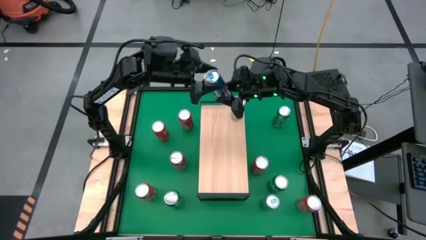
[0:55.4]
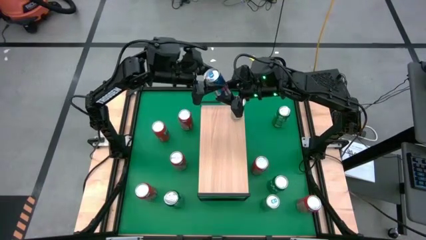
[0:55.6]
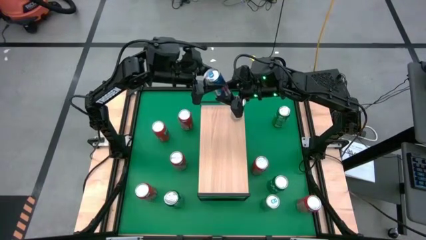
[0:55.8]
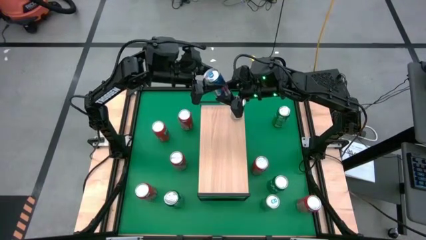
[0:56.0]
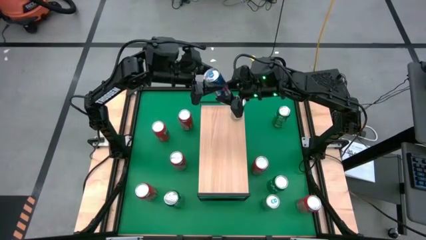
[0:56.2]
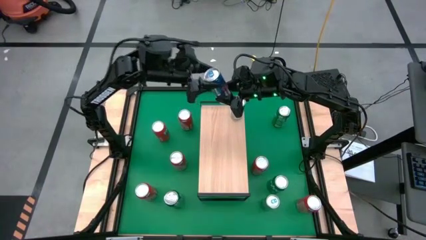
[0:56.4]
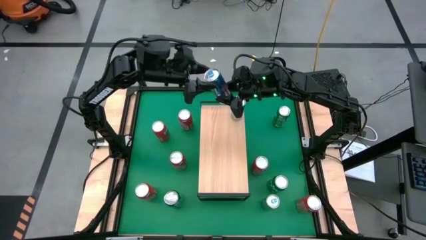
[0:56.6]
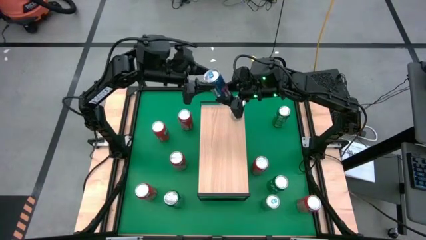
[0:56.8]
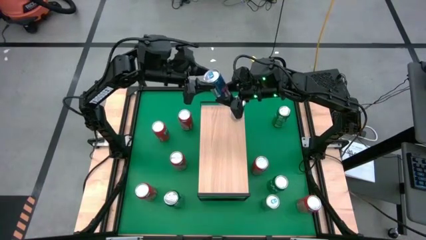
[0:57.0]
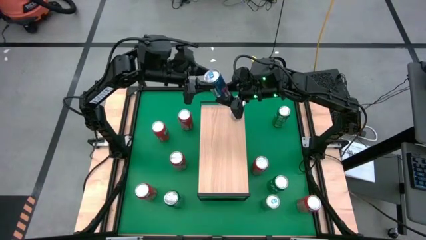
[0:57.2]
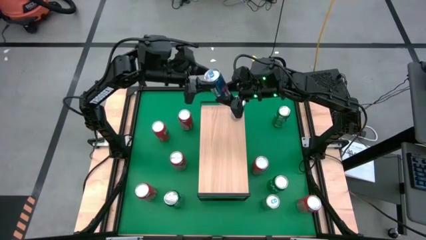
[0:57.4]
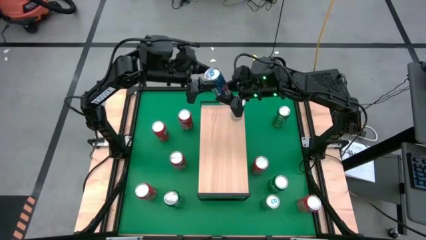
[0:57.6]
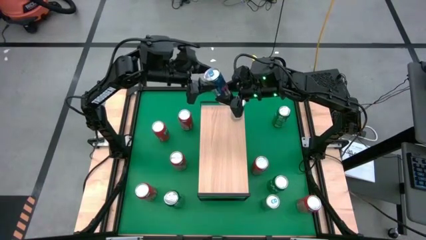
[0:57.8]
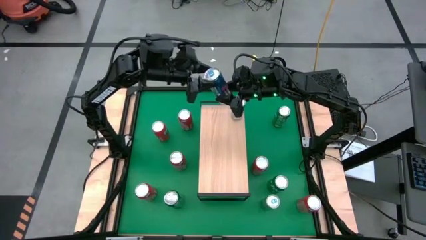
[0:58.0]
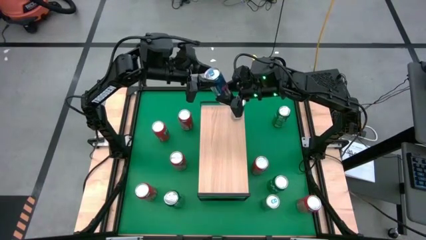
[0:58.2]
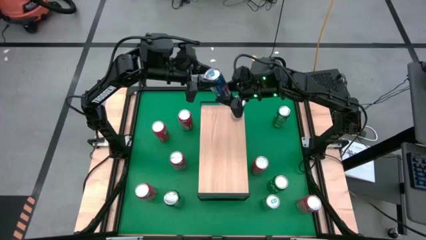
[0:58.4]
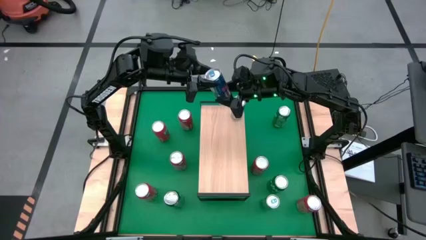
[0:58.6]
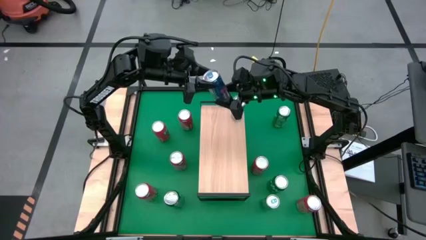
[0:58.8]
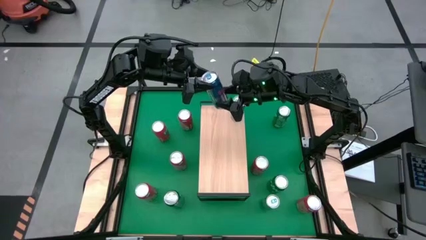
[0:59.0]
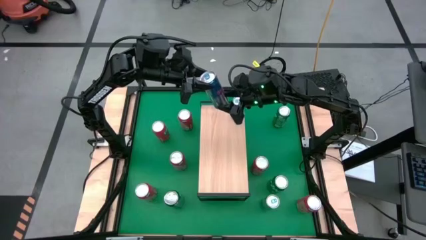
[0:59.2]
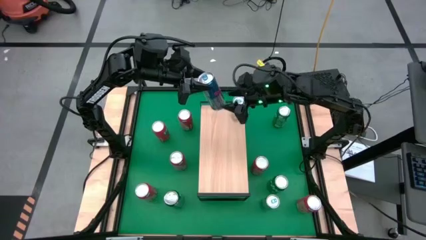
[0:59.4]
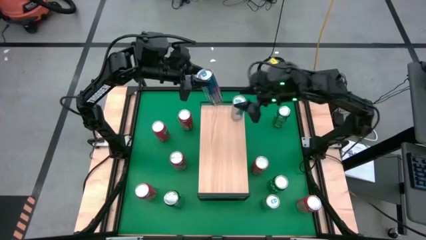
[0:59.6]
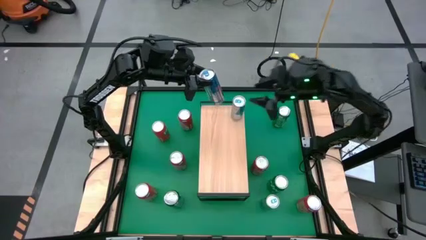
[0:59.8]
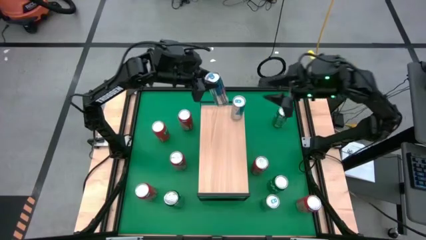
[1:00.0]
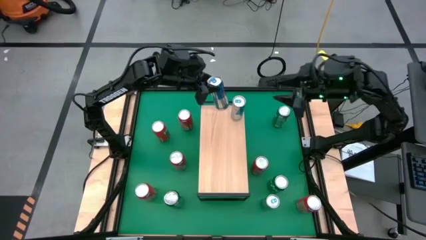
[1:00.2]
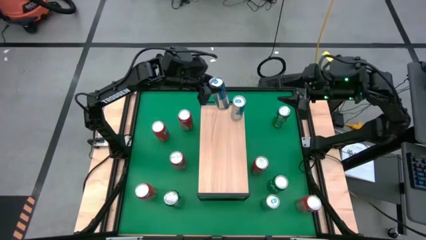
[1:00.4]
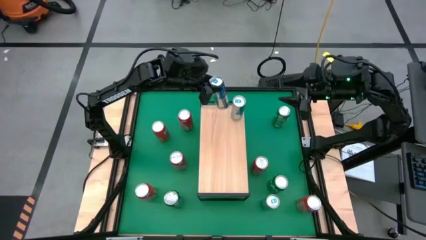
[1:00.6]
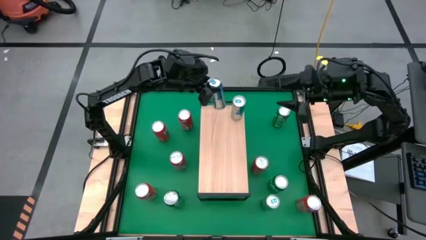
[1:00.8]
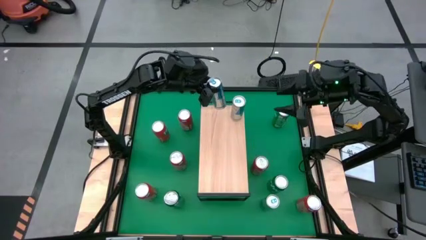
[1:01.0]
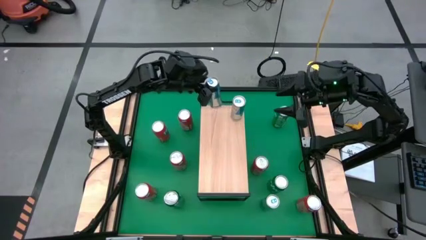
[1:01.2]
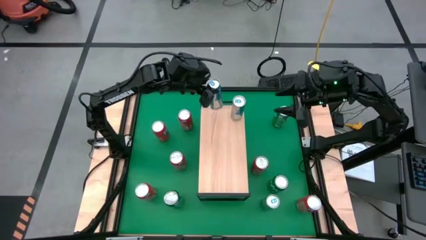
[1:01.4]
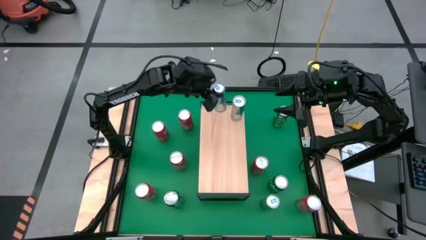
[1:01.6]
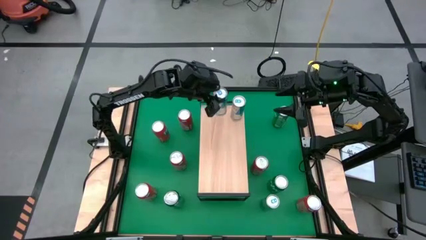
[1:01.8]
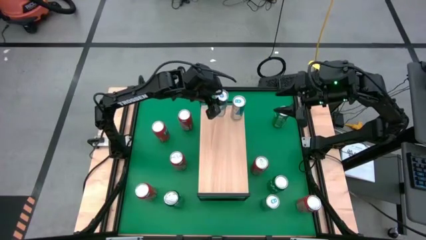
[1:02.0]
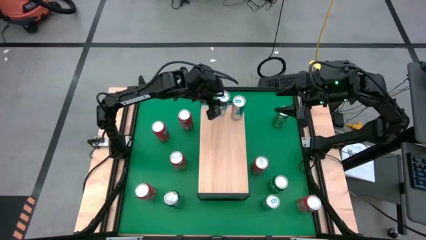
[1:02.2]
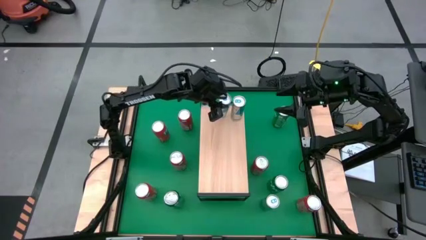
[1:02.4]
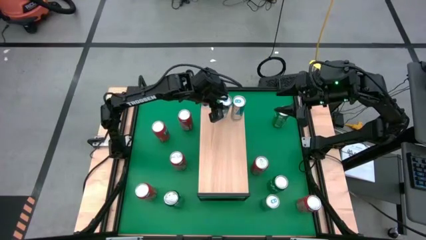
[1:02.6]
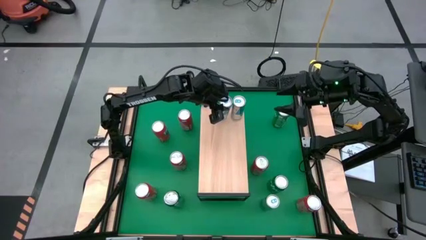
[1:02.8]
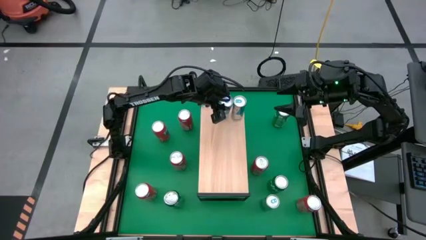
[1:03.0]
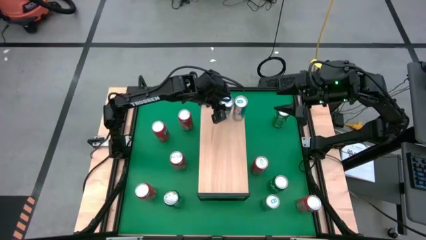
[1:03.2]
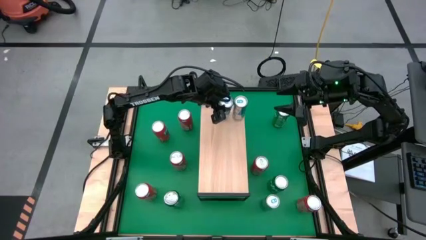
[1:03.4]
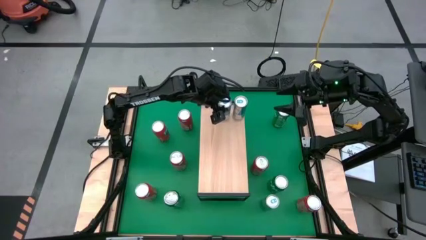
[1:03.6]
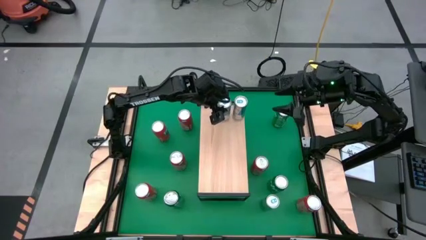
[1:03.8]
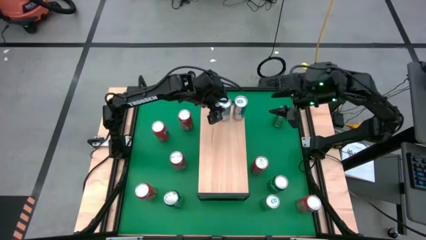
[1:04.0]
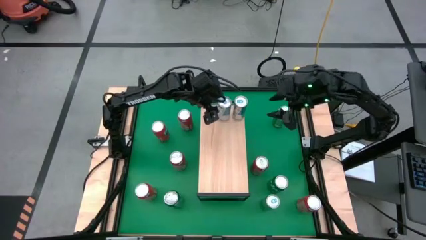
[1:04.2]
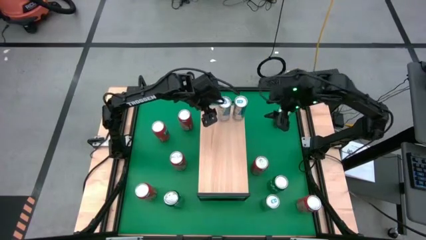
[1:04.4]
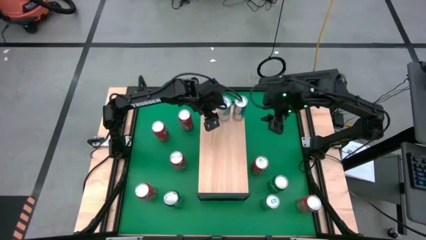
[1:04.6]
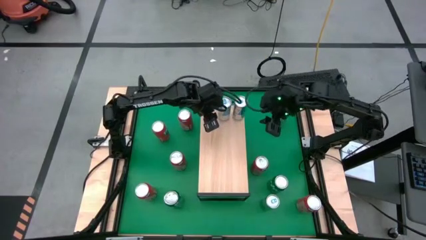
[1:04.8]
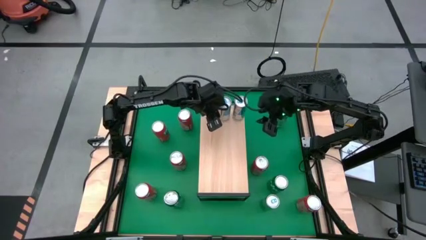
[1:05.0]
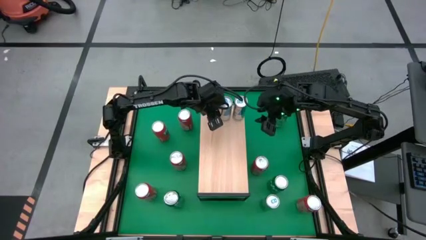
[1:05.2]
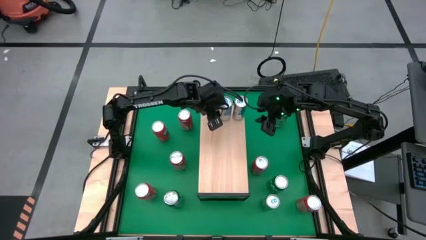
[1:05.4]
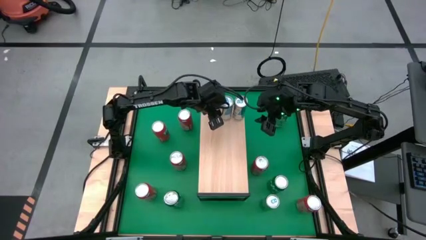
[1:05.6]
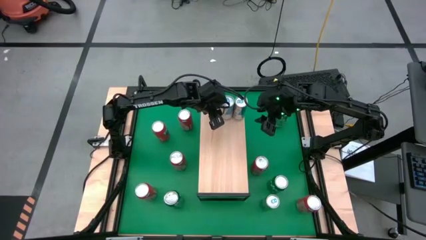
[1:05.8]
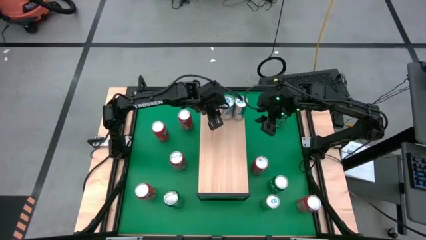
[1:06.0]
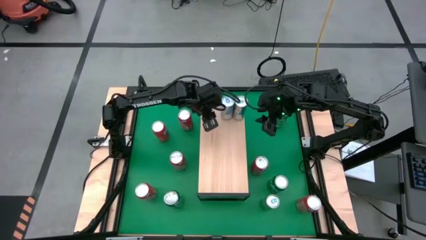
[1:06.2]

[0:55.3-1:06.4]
Task: Place canned beverage on shelf
Put the blue soda can on the shelf aligned with the other blue soda can

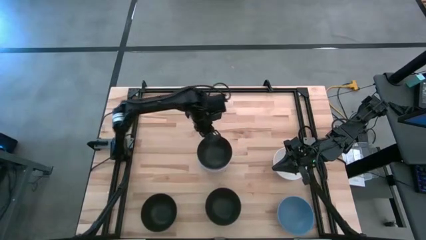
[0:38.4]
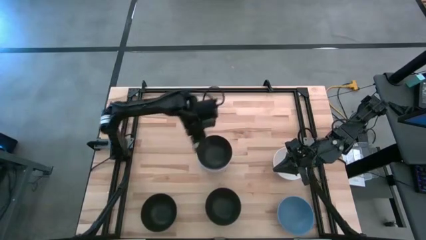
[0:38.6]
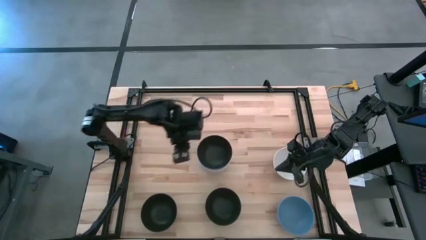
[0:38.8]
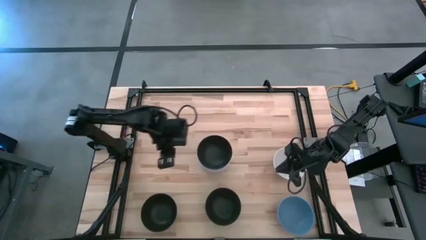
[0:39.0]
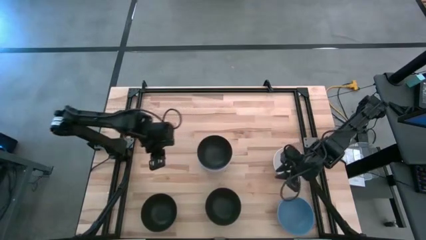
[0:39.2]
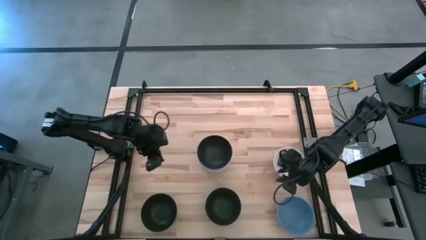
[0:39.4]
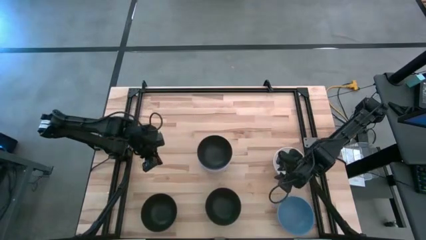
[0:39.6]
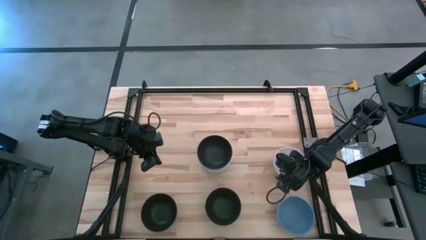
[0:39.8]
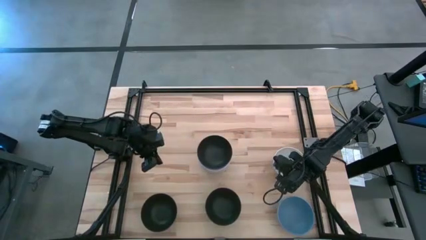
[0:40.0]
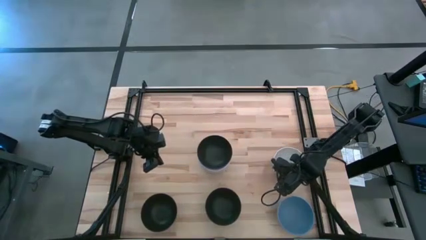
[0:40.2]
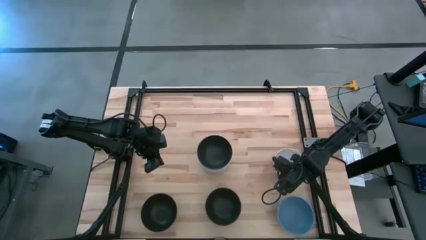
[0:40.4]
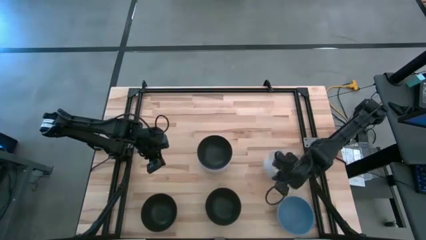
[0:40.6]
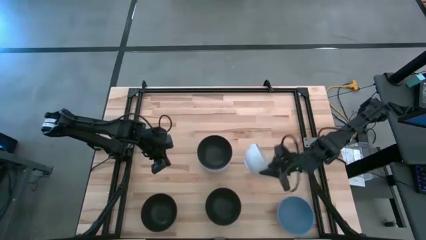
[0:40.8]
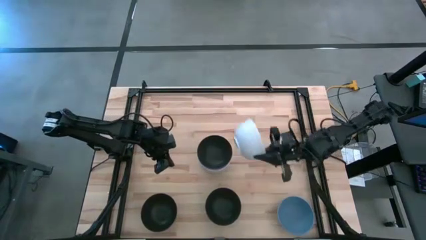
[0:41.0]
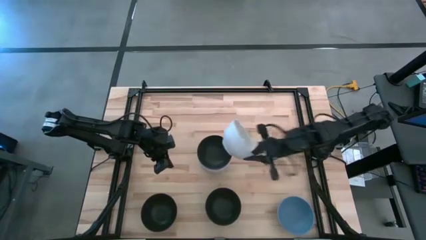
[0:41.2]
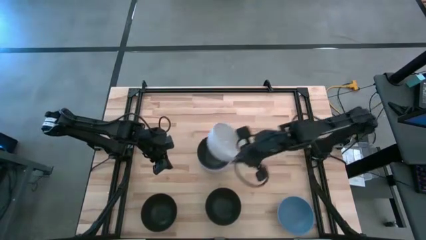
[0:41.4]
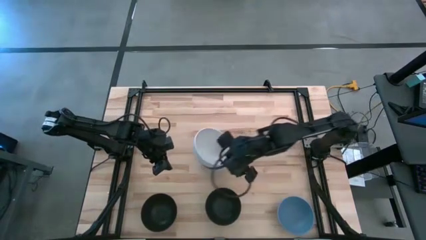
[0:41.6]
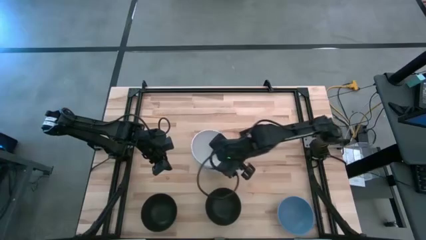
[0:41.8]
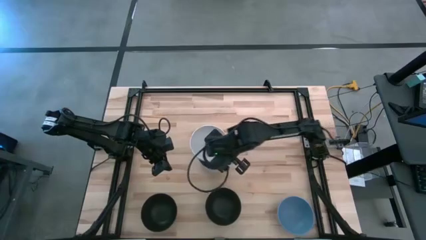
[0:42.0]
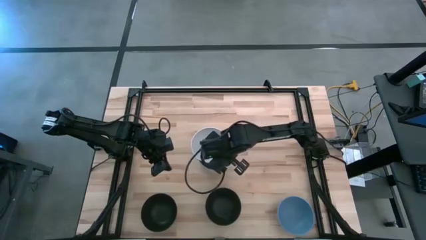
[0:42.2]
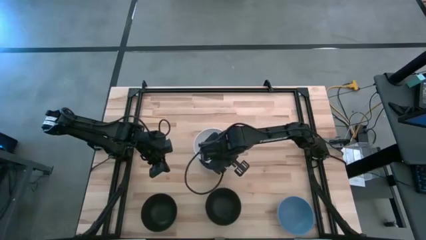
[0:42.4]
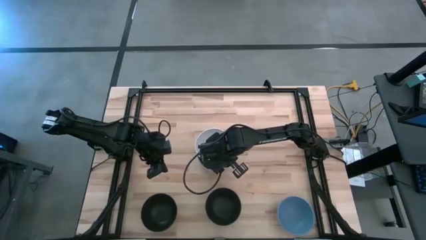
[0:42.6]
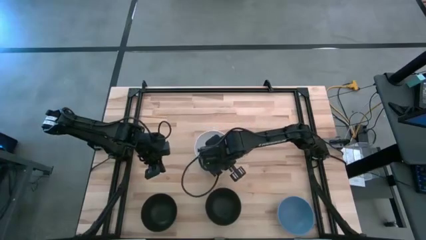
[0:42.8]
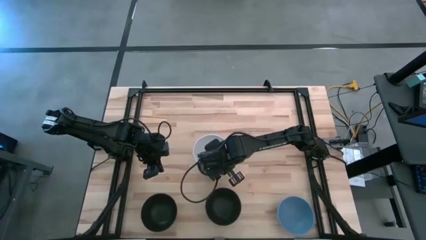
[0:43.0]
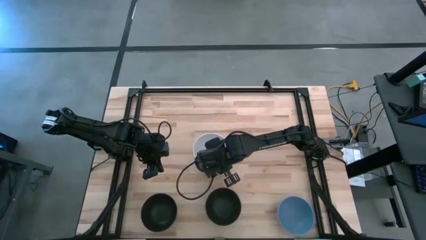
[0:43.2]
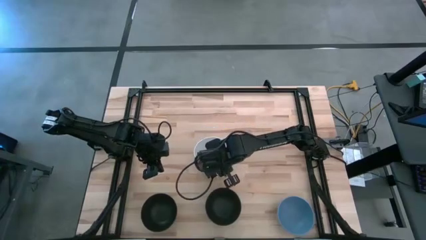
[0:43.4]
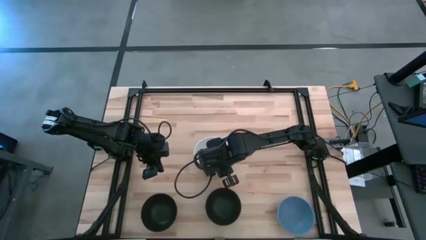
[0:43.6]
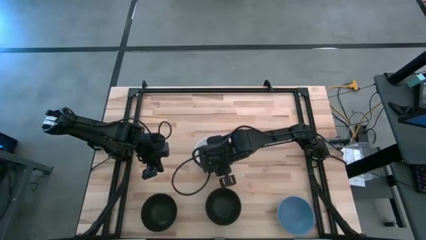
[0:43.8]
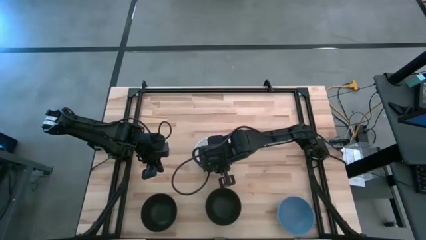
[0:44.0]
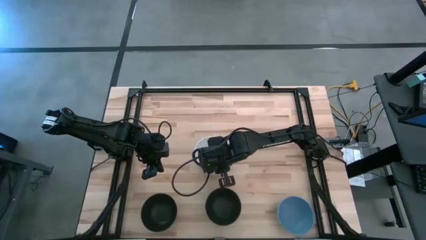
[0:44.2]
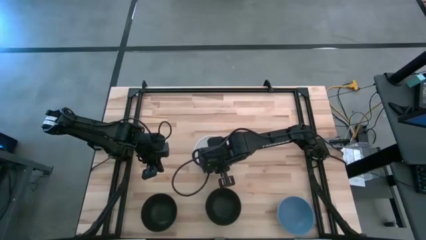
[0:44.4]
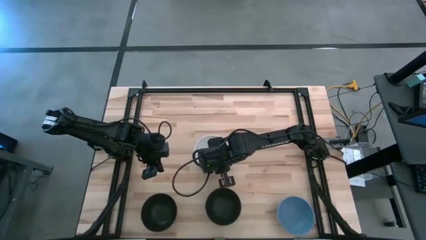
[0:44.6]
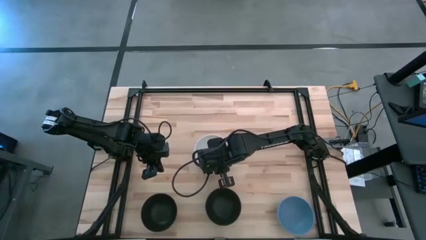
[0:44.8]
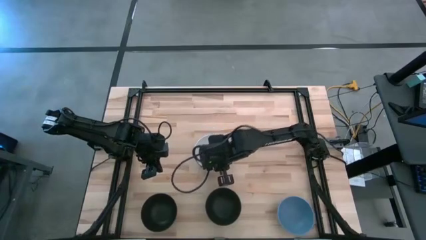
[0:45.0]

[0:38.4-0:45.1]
Task: Nest bowls inside each other
Stack the white bowl on top of the black bowl
